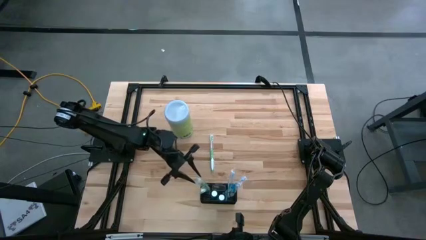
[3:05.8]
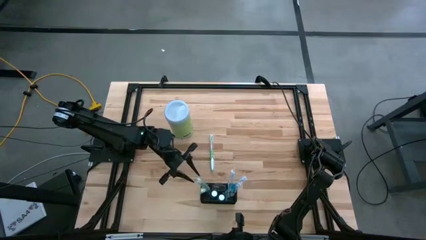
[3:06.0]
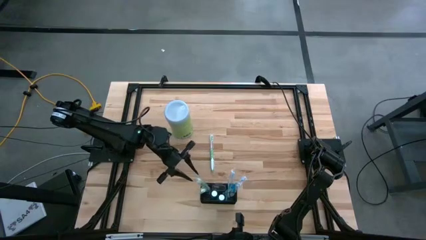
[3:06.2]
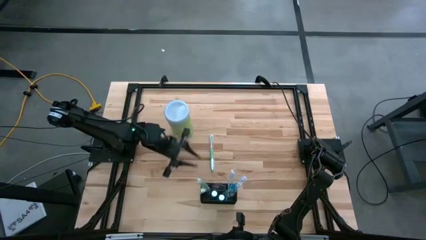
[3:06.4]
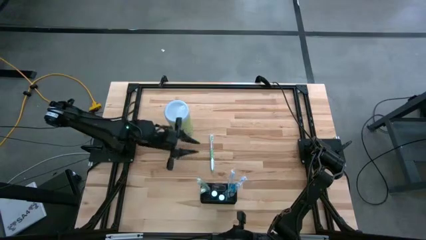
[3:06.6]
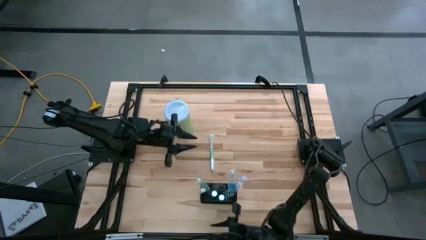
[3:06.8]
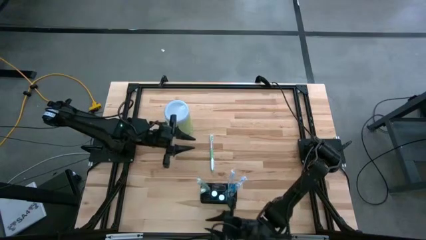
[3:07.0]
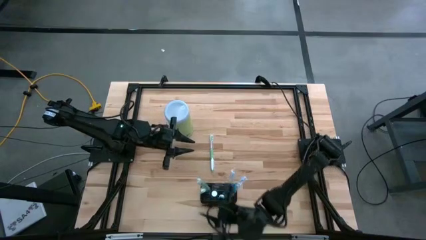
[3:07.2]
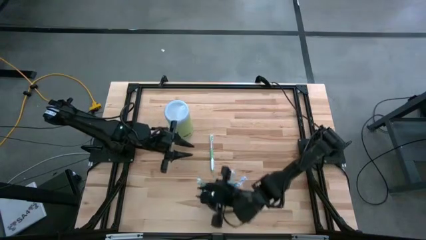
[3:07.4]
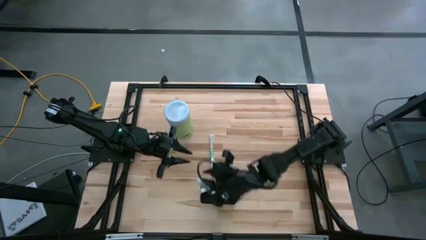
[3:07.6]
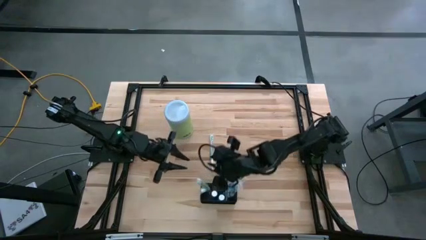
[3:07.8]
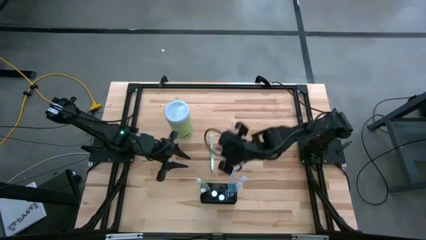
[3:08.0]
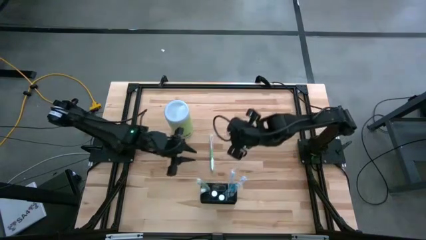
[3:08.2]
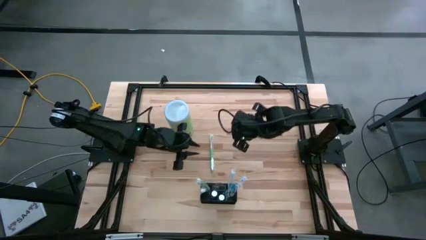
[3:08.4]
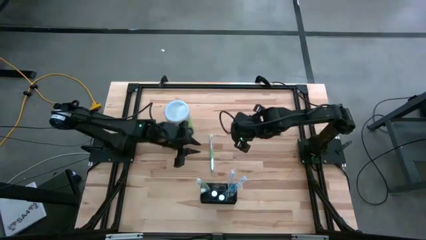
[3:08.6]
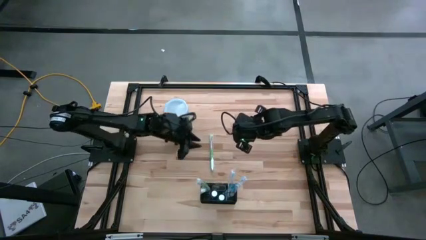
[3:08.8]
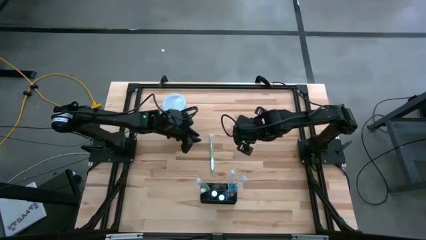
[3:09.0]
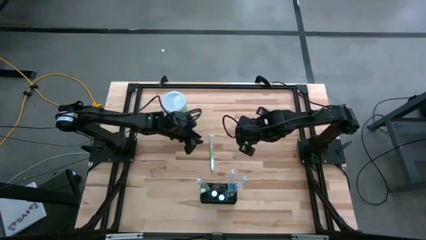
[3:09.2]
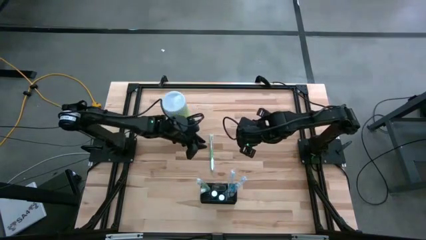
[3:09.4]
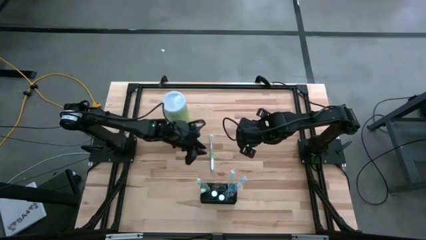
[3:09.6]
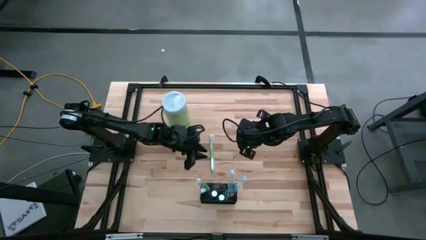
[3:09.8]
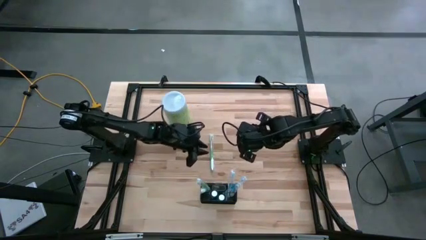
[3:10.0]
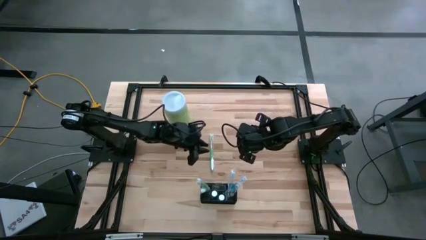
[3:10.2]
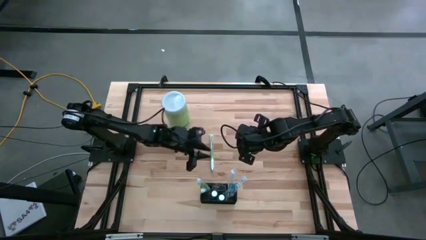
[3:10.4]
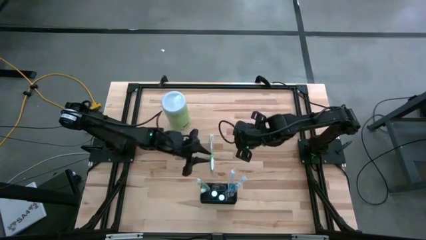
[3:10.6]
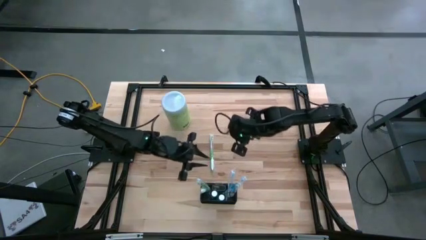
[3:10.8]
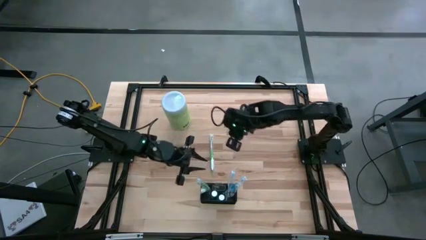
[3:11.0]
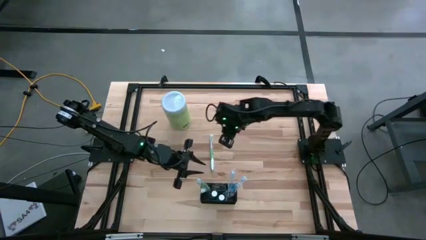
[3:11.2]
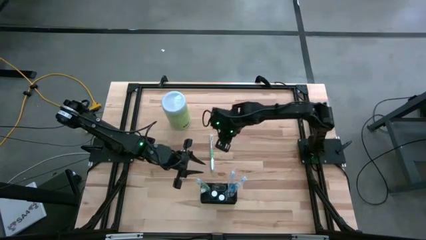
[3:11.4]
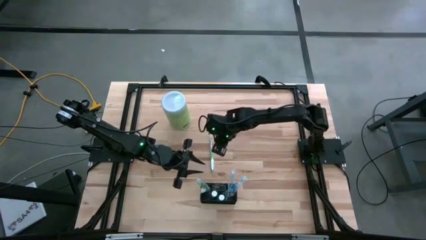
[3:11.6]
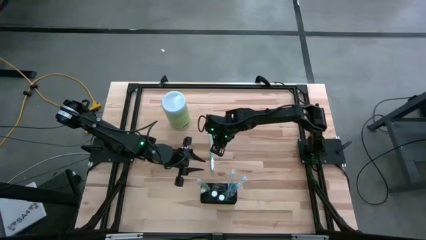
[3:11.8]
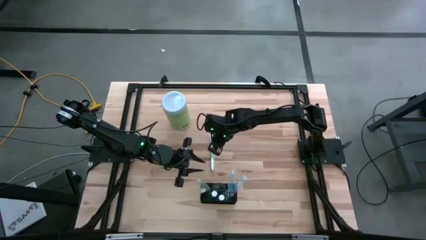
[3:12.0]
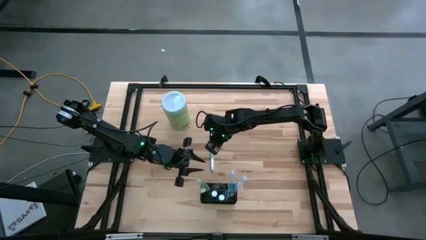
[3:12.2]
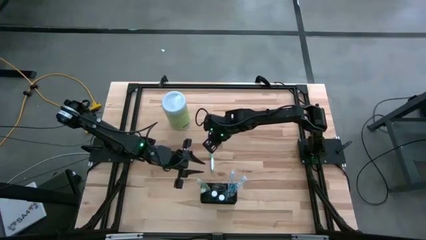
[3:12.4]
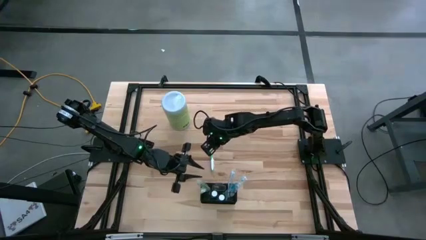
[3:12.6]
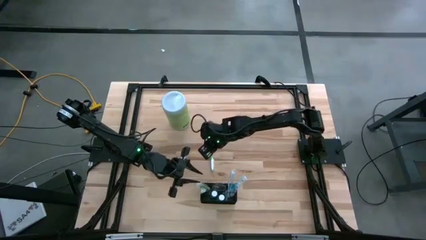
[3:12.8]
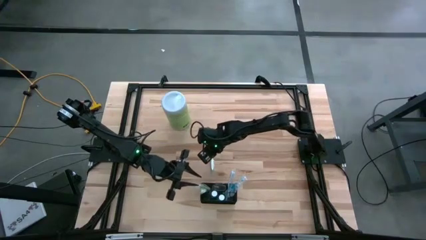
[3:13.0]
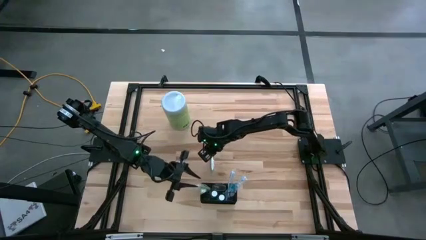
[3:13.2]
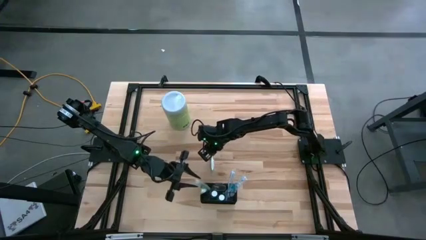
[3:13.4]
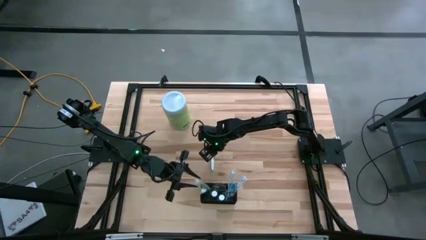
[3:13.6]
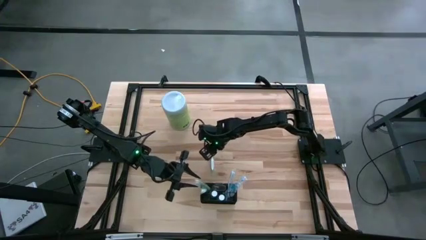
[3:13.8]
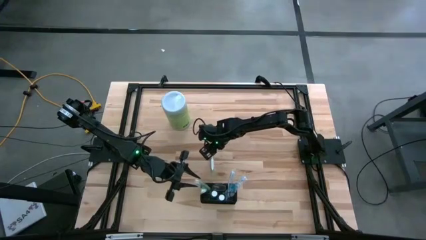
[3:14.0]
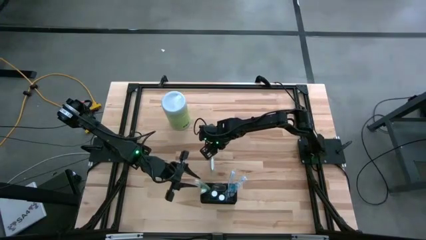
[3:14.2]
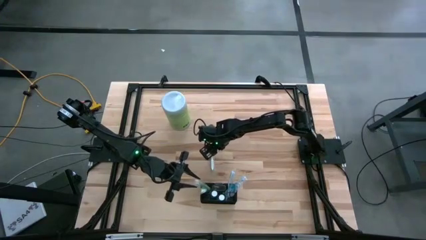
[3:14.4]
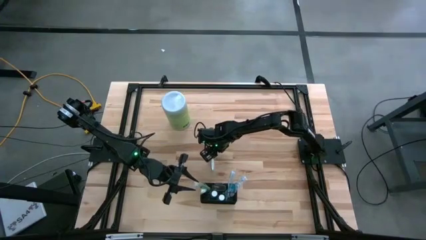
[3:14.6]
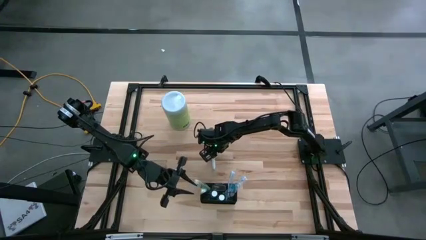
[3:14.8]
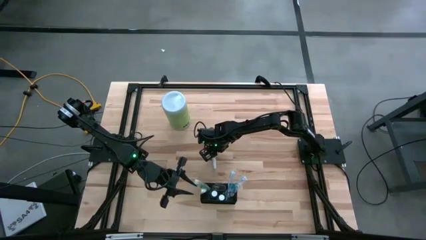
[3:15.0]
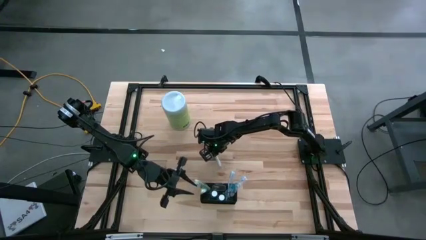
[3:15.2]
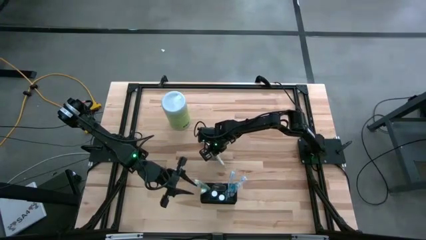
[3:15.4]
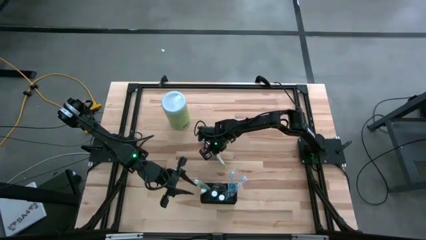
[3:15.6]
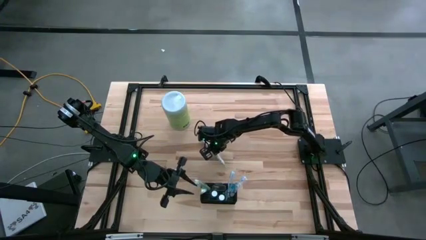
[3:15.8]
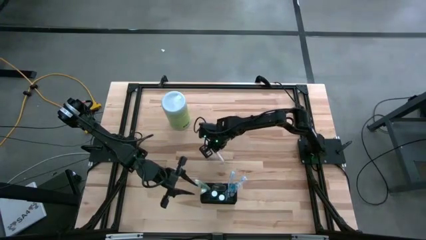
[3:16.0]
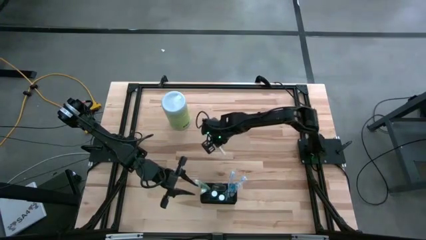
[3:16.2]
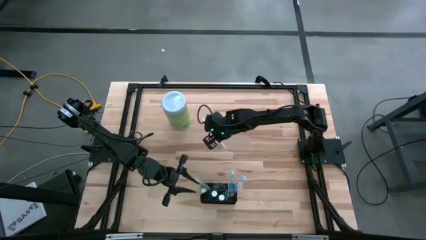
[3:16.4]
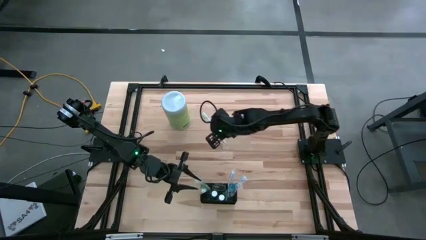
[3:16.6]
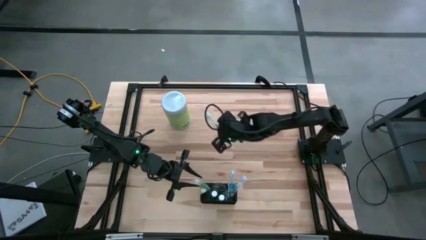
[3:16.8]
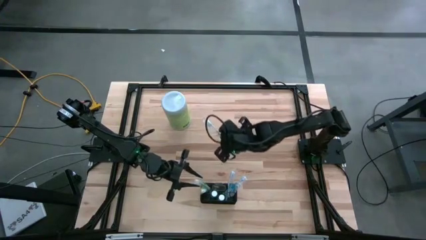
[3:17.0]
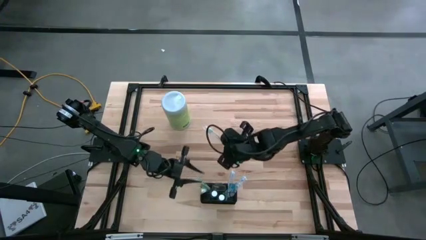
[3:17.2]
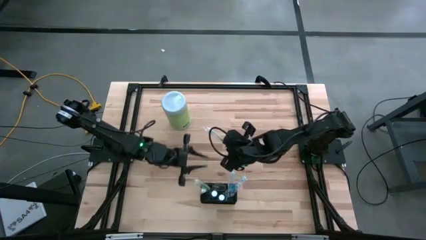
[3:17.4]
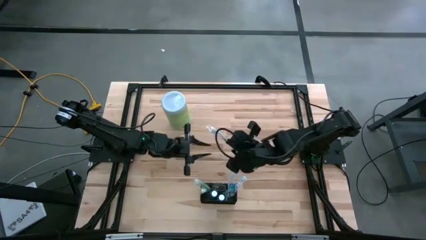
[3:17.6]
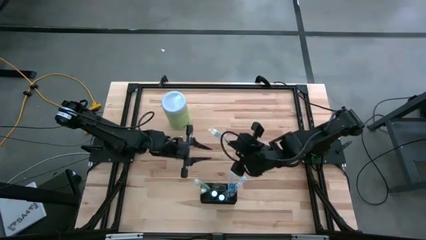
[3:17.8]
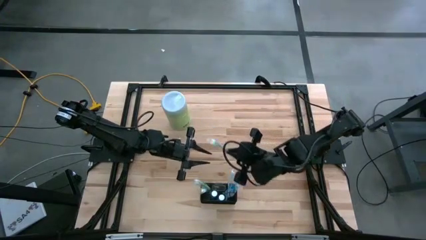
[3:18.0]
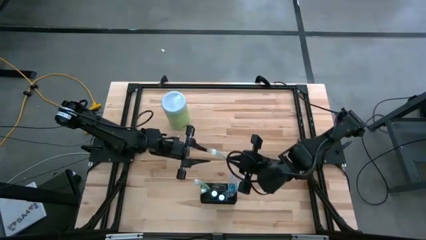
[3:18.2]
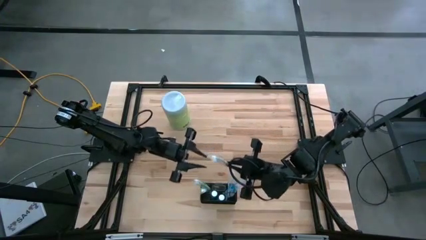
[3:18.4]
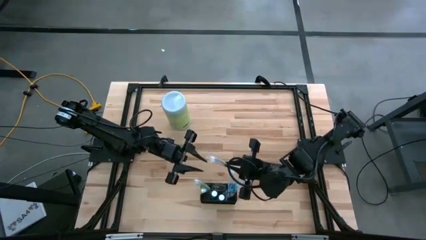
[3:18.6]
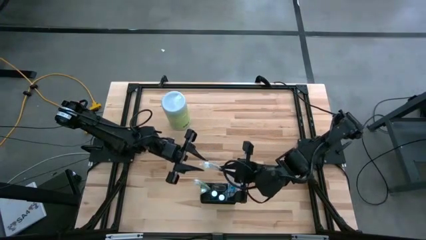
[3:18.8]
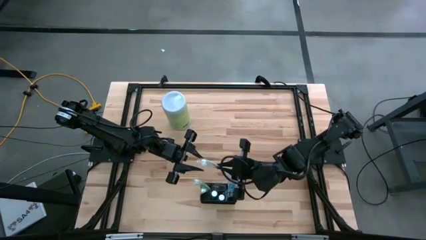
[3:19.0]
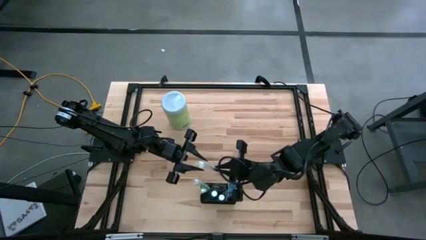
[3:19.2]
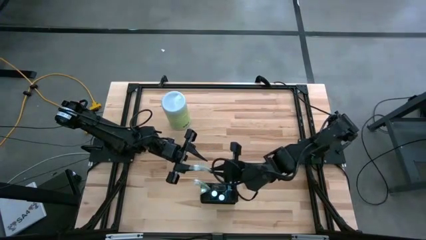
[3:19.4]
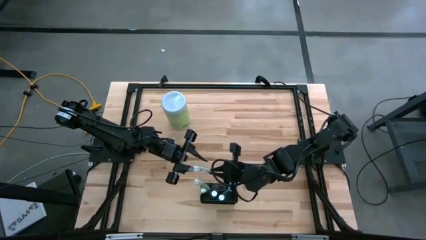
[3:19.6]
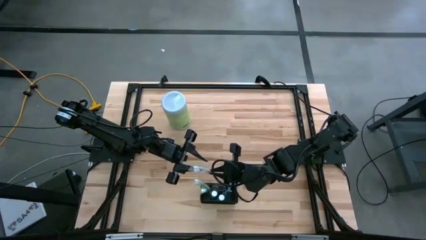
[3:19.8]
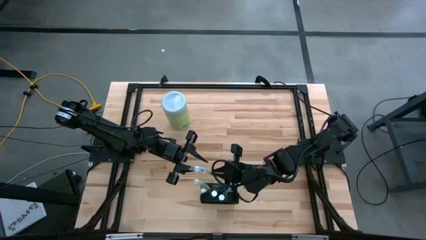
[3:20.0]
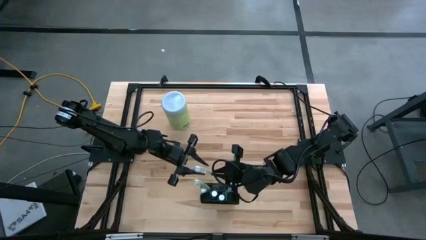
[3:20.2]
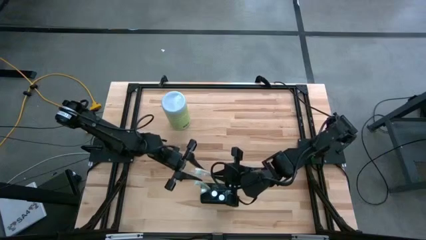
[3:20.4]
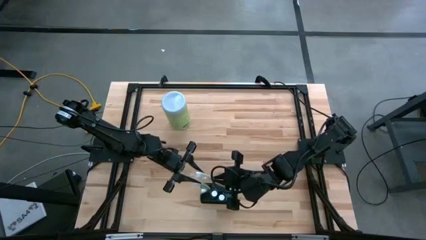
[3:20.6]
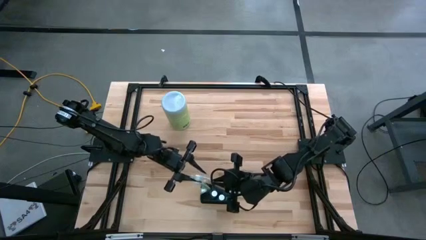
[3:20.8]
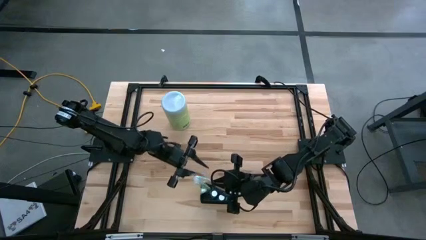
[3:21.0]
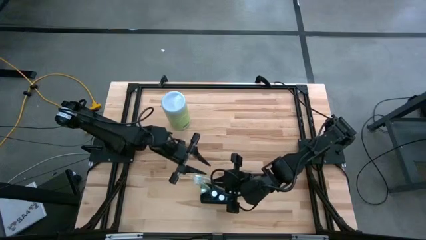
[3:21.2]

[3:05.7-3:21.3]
Task: Pick & Place toothbrushing station
Put the green toothbrush into the mesh organizer
